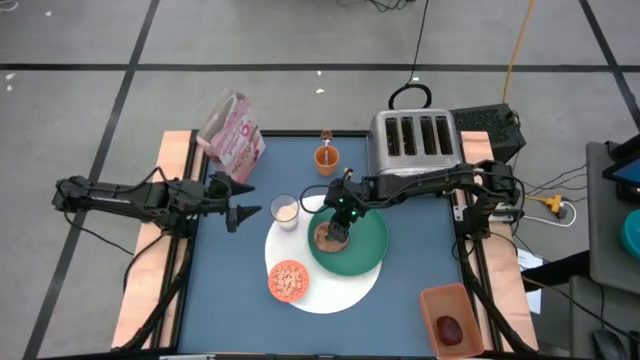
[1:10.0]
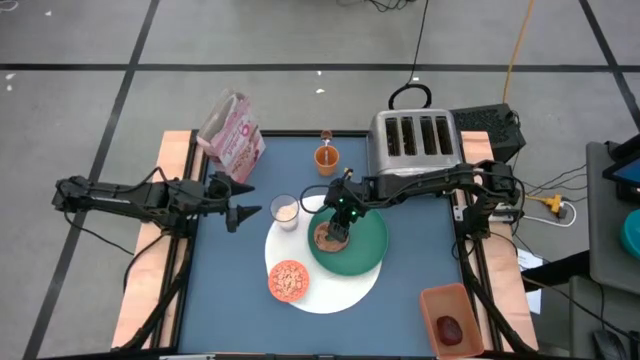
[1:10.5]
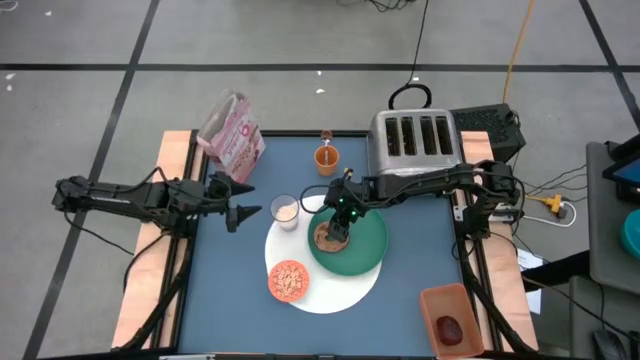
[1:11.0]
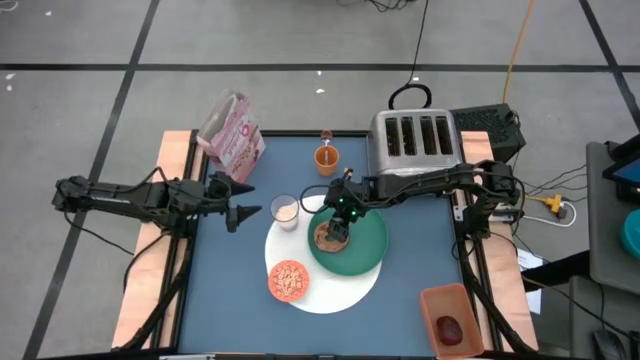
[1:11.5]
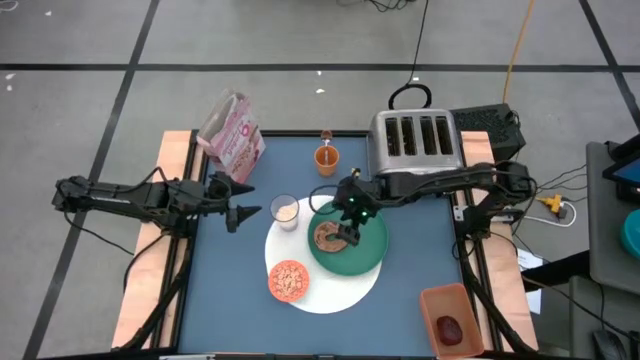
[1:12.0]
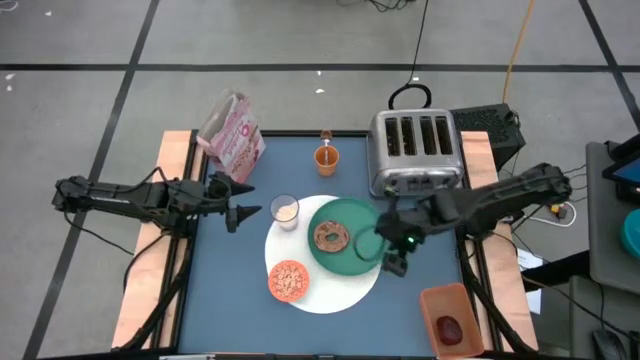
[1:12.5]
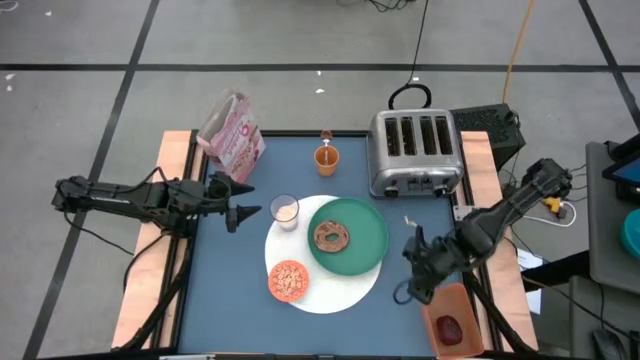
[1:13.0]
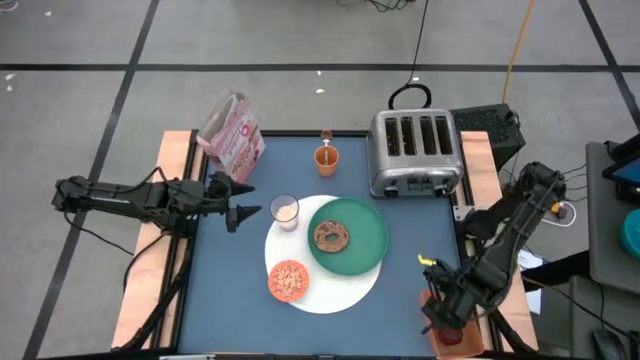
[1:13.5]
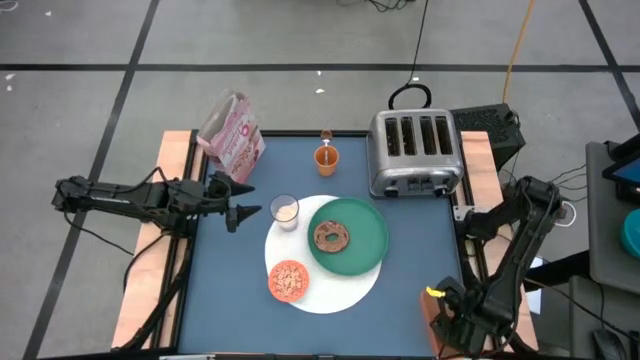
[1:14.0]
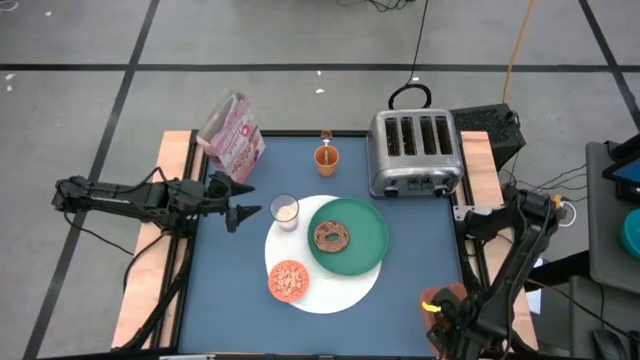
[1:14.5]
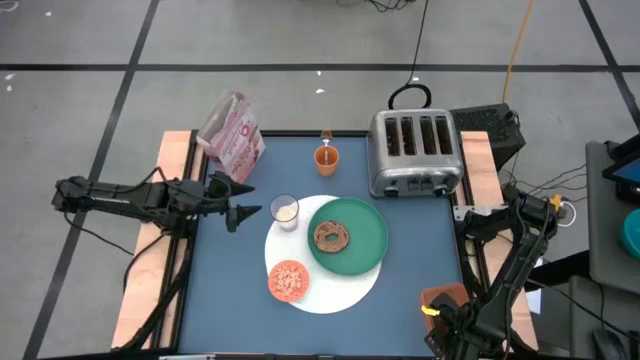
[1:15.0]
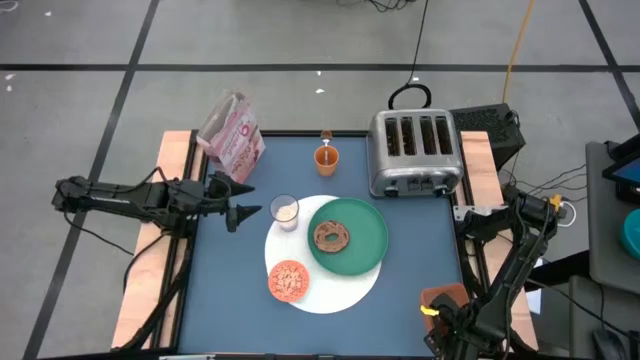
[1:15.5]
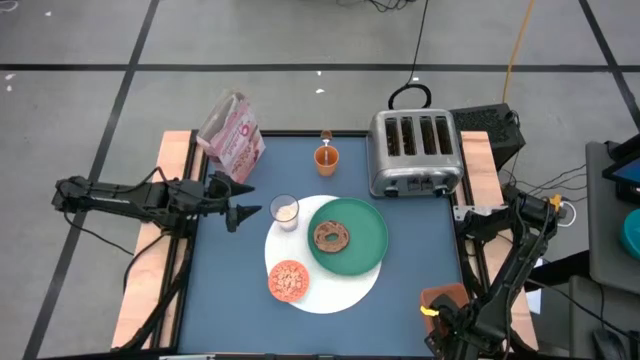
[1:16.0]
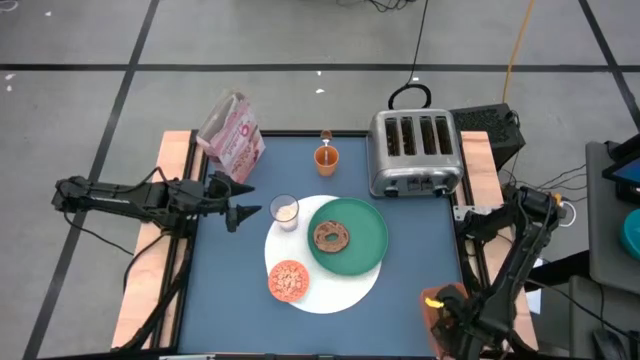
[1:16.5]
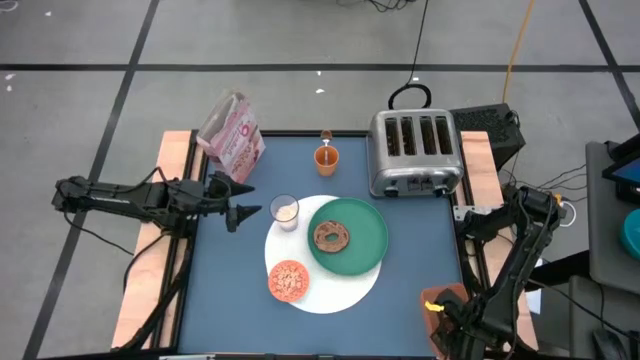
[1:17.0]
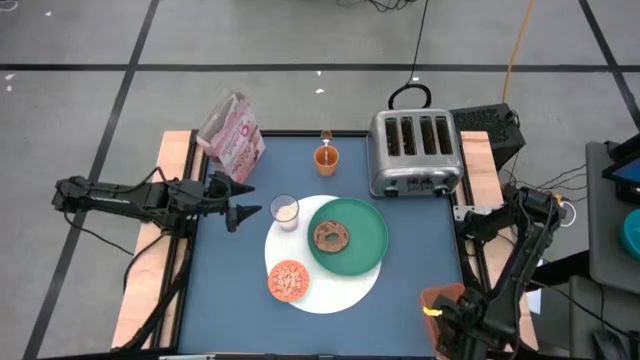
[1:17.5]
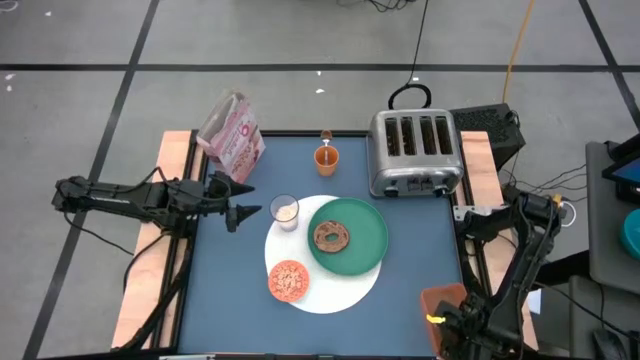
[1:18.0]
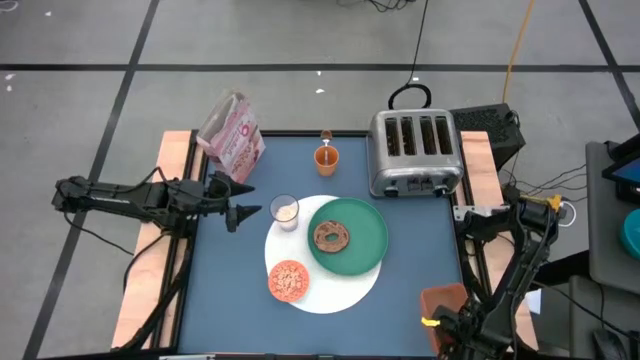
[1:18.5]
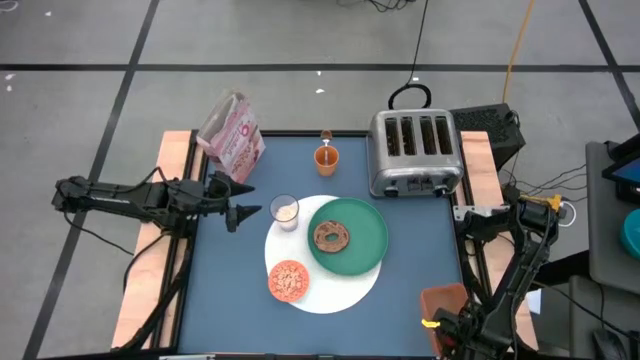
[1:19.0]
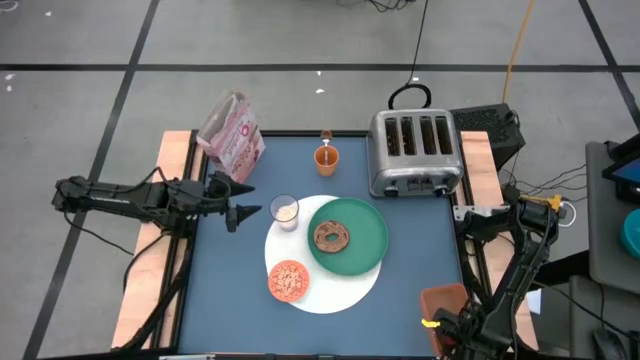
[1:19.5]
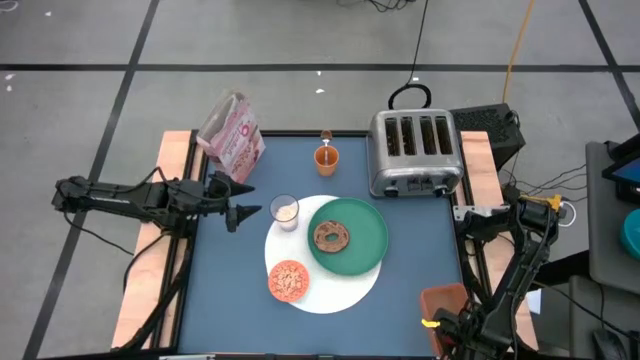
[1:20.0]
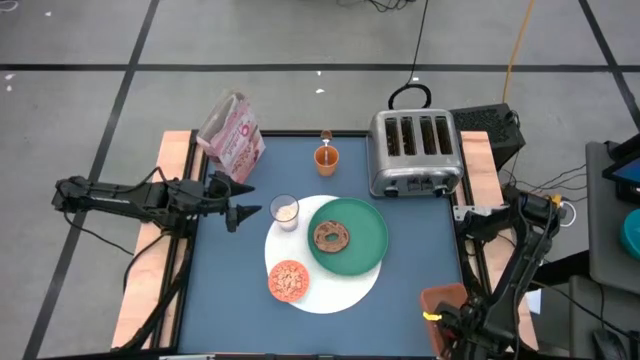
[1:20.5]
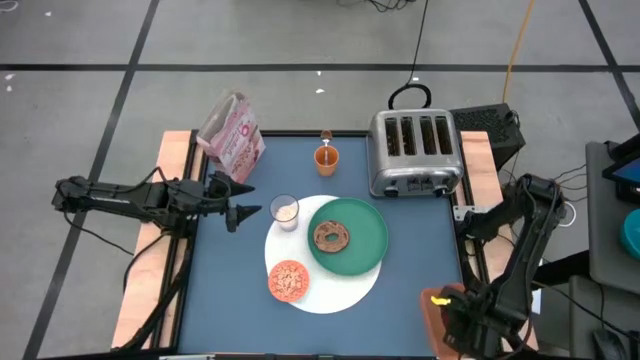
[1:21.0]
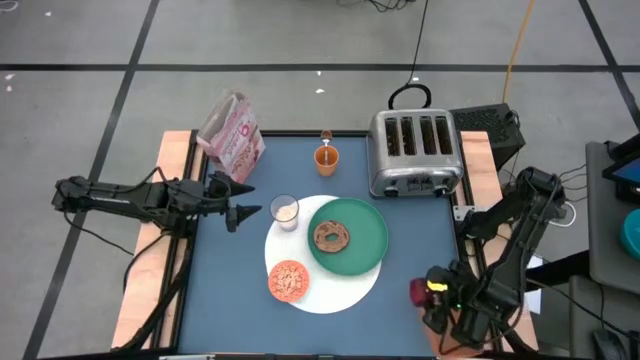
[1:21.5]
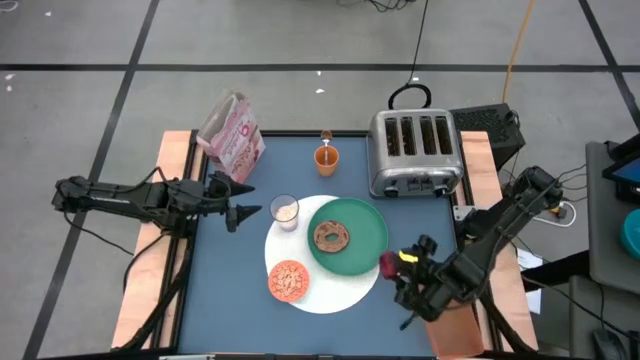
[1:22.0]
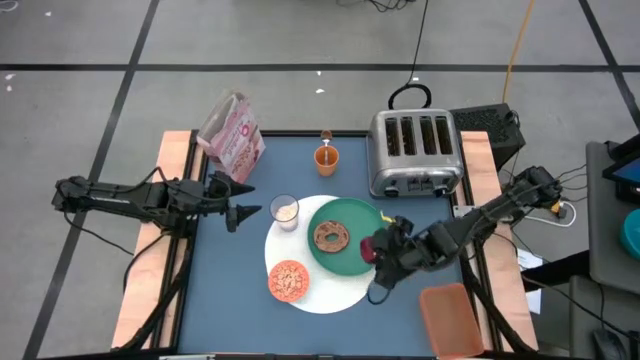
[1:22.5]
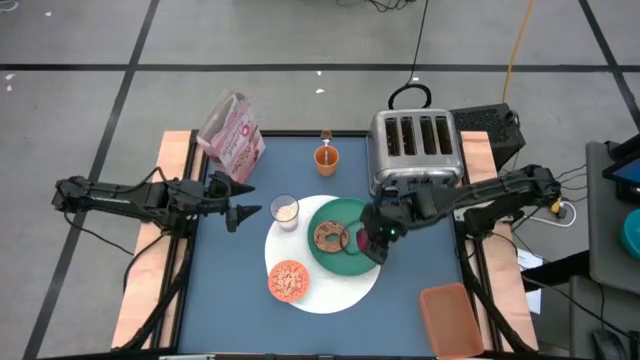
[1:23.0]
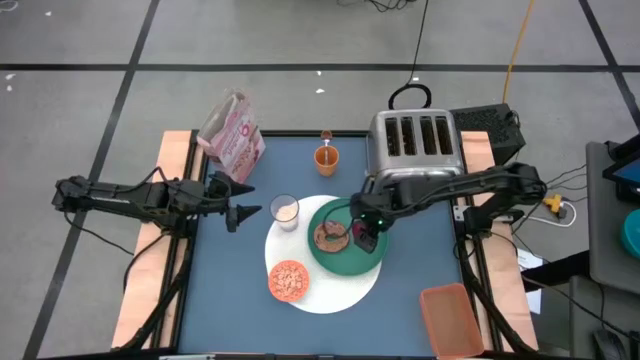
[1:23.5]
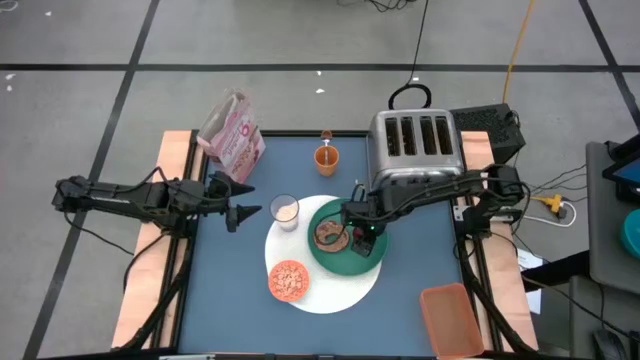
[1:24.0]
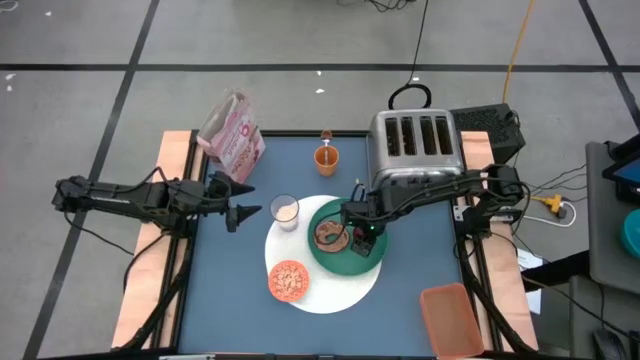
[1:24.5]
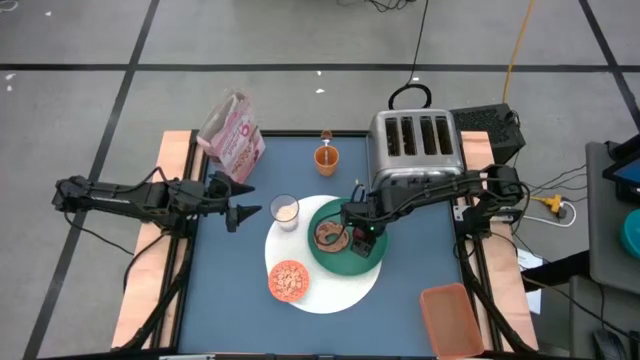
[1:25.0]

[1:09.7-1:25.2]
Task: Arrange a breakfast setting
Put the apple on the green plate

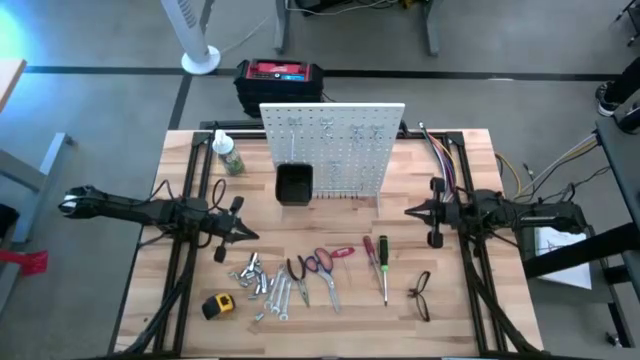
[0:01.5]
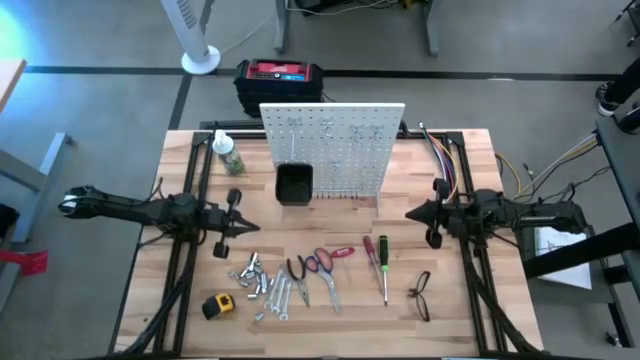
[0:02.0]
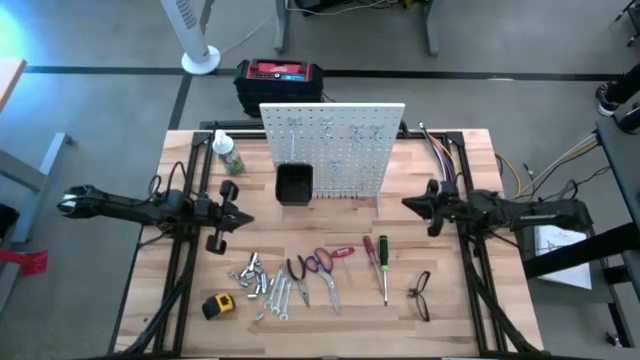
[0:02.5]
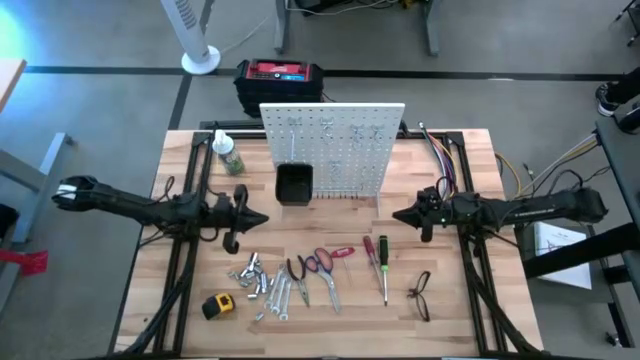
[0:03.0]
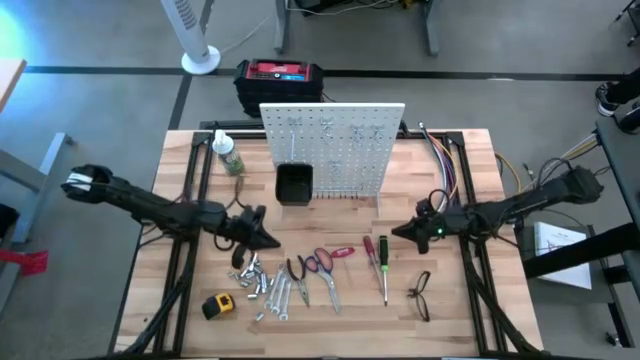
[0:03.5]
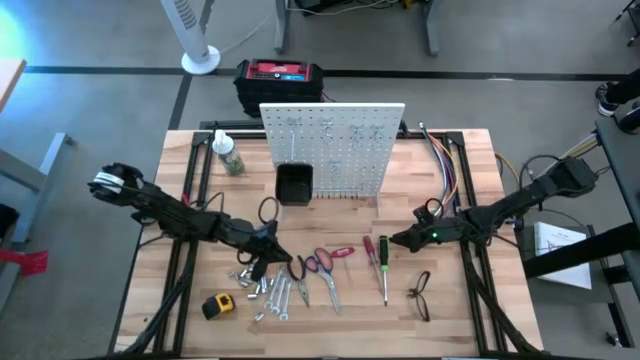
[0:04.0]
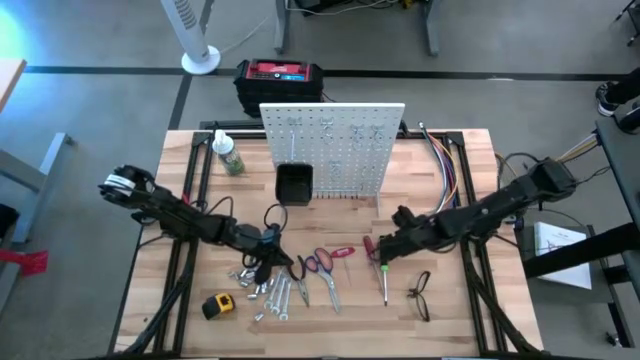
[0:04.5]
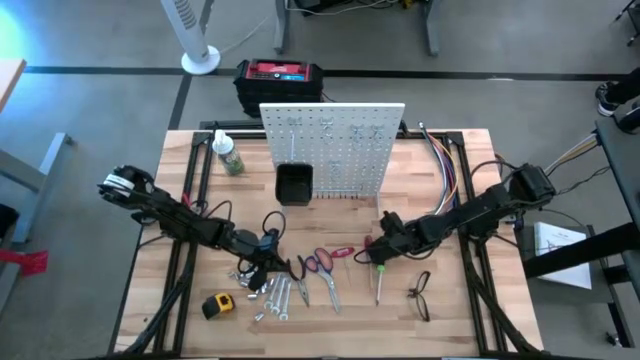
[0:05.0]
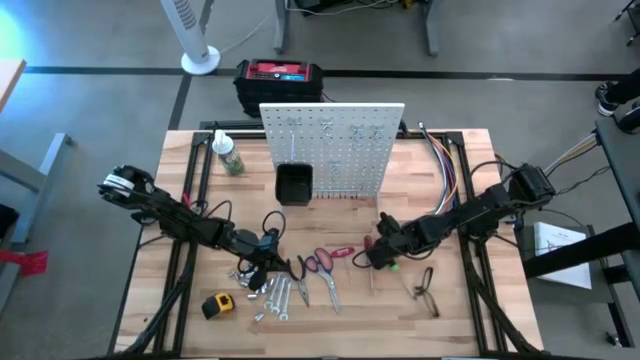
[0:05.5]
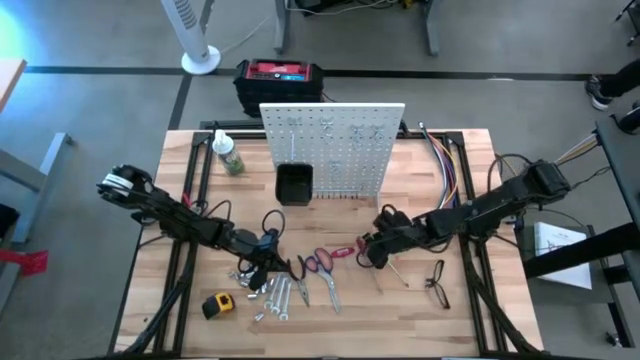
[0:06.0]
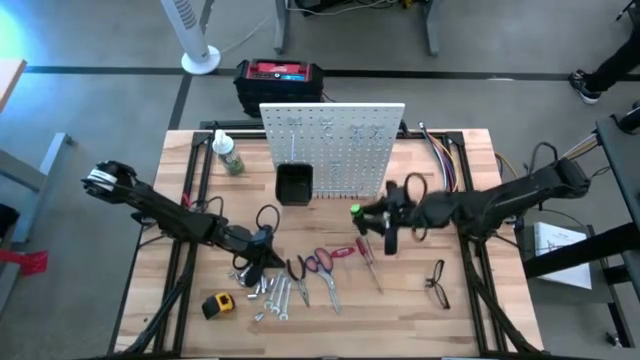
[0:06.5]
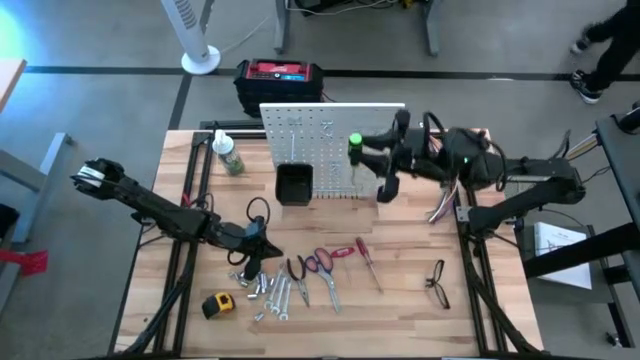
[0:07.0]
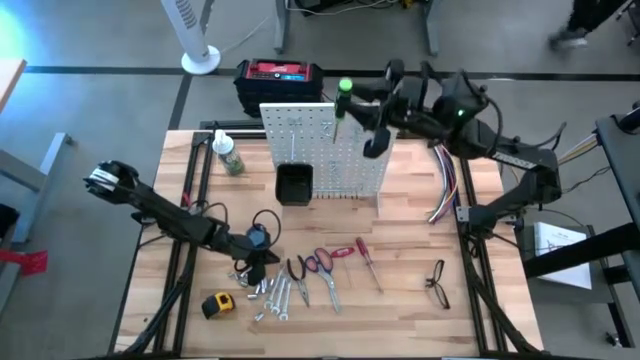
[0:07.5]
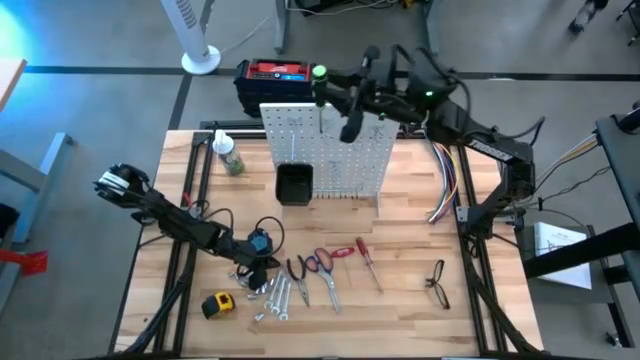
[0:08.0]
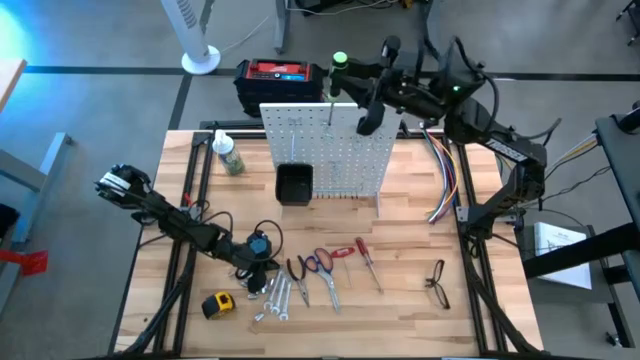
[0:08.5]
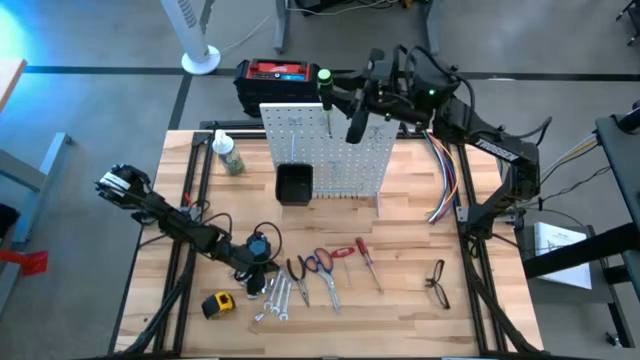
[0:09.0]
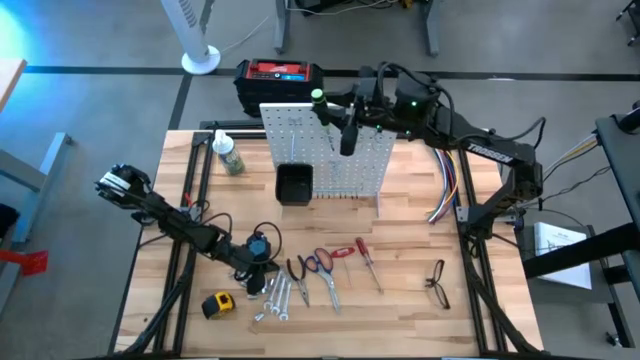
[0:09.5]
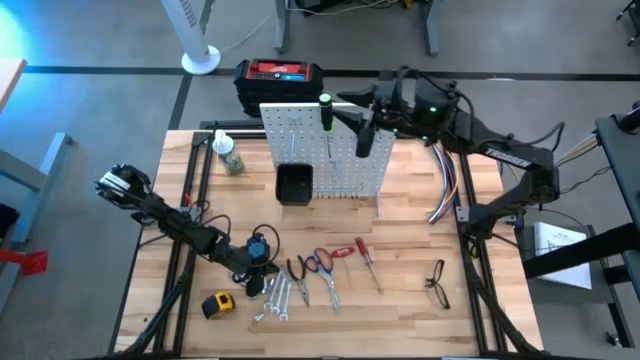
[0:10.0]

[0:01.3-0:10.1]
Task: Hang tools onto peg board
Hang the green screwdriver on the pegboard
